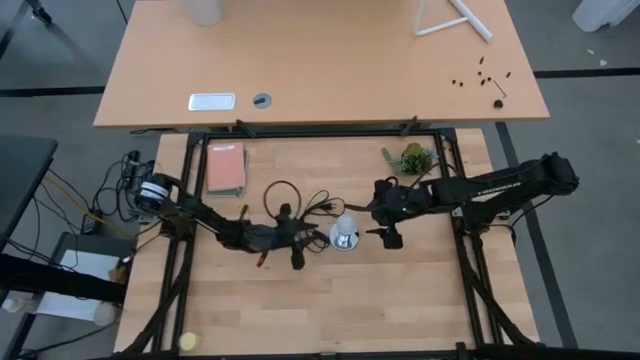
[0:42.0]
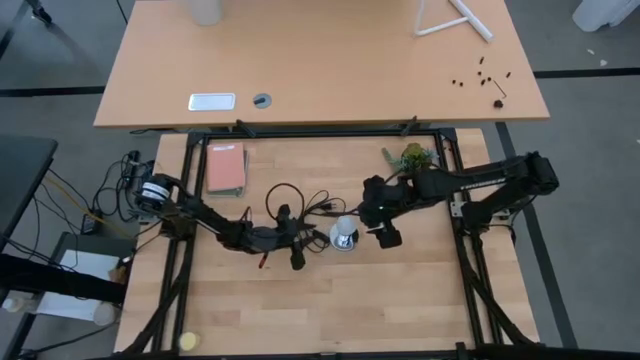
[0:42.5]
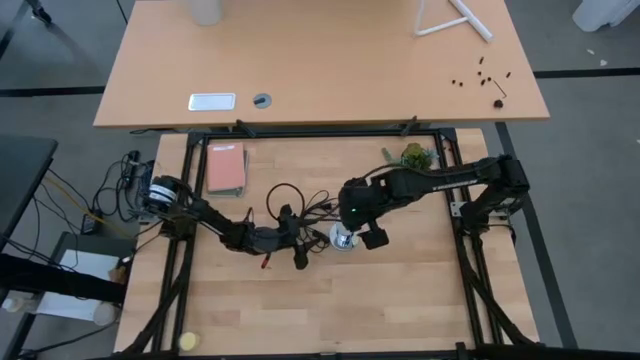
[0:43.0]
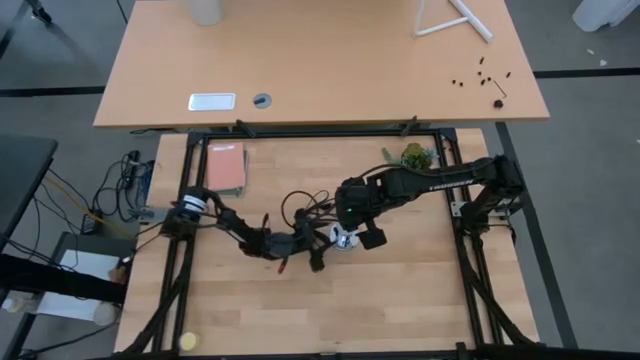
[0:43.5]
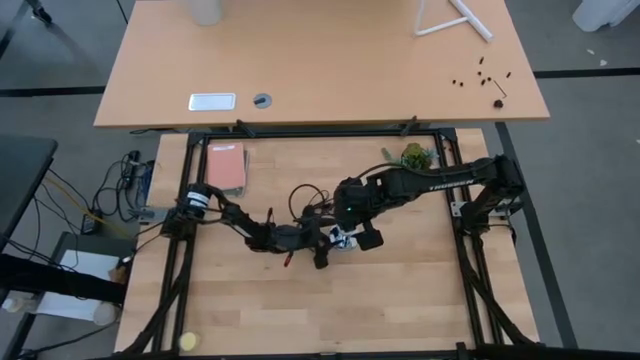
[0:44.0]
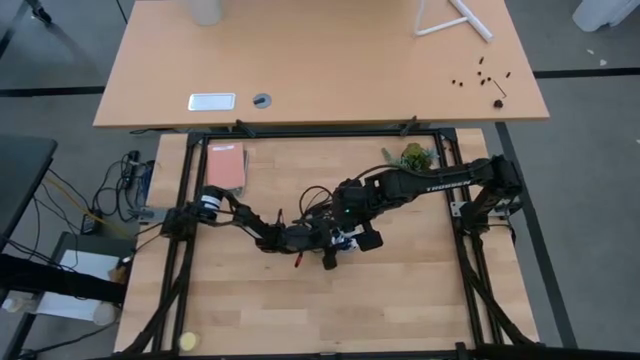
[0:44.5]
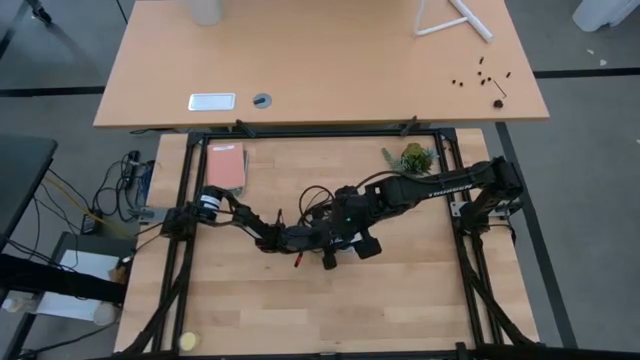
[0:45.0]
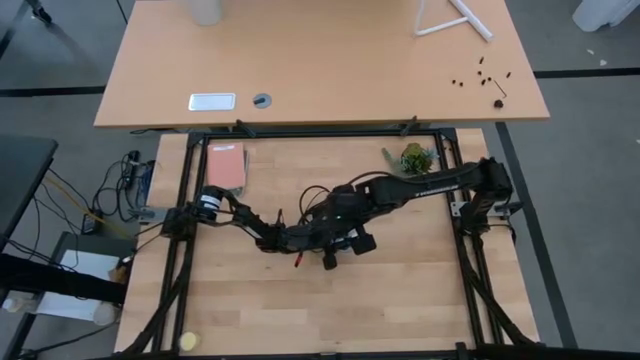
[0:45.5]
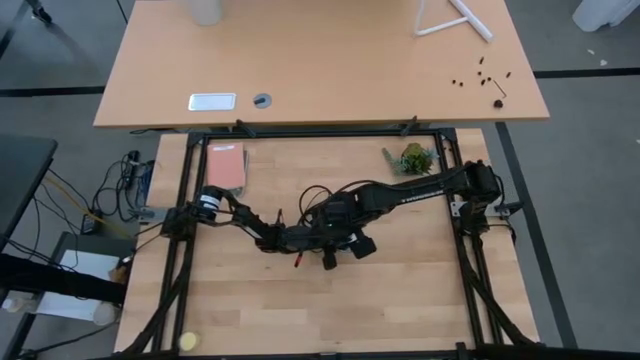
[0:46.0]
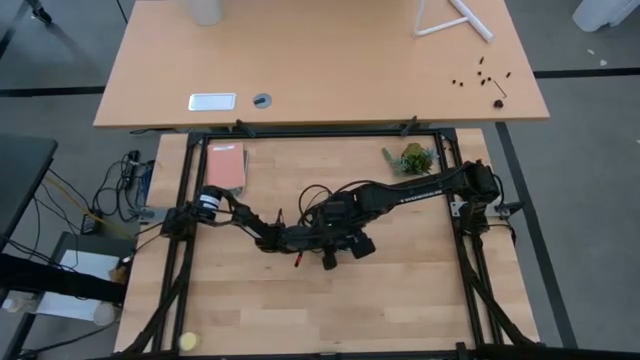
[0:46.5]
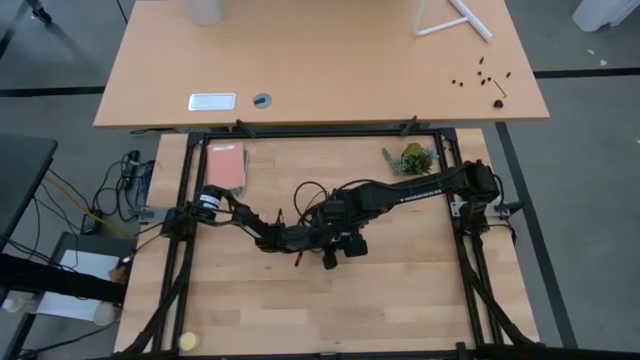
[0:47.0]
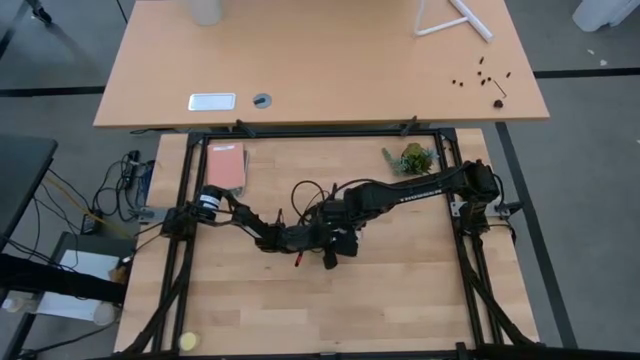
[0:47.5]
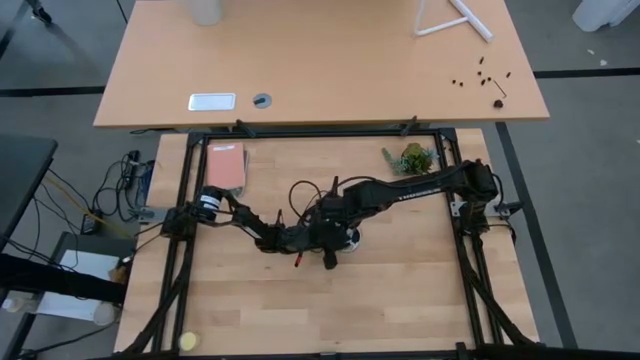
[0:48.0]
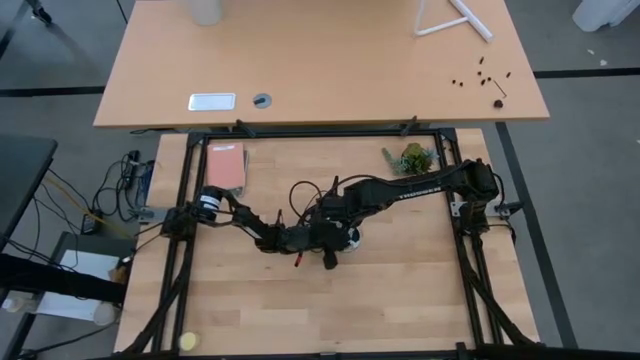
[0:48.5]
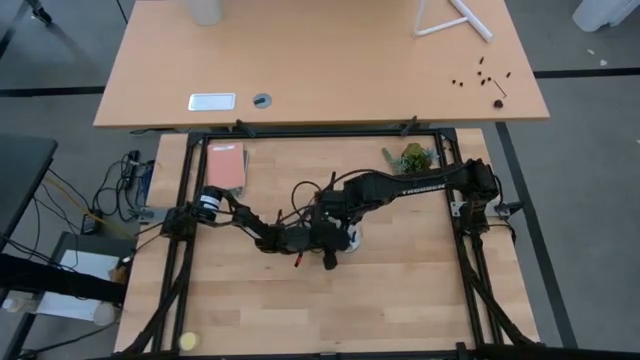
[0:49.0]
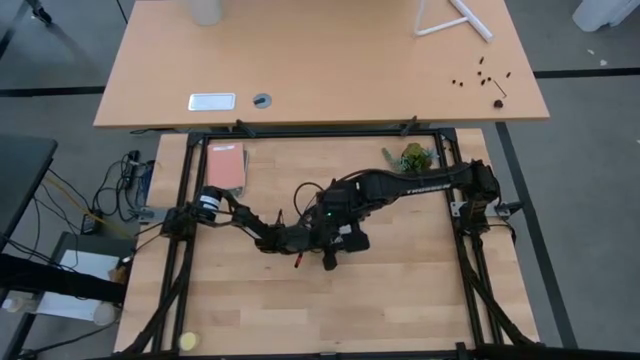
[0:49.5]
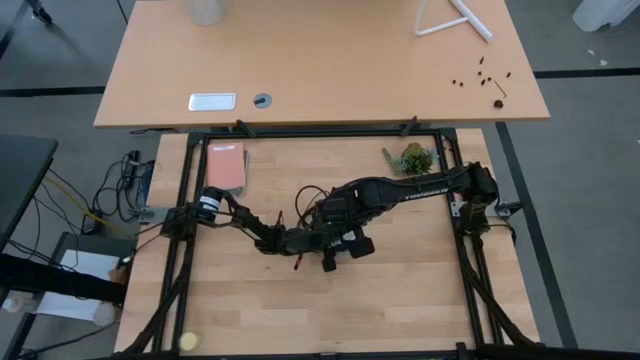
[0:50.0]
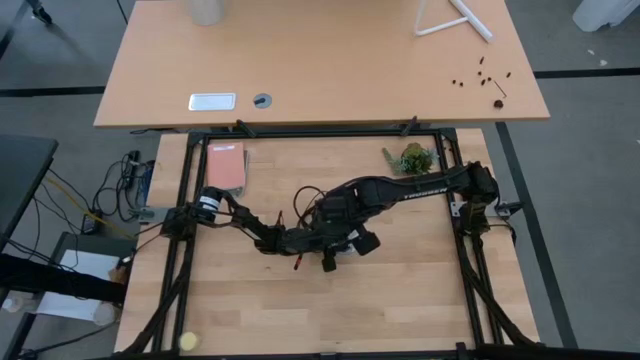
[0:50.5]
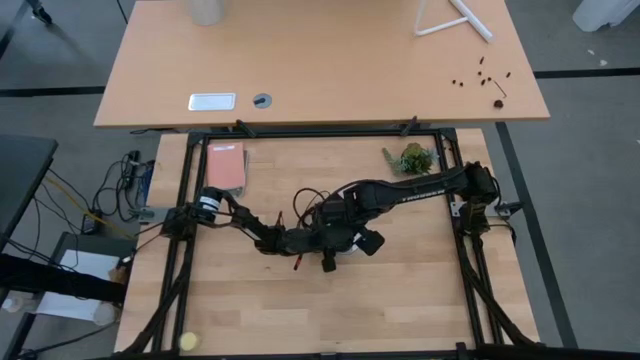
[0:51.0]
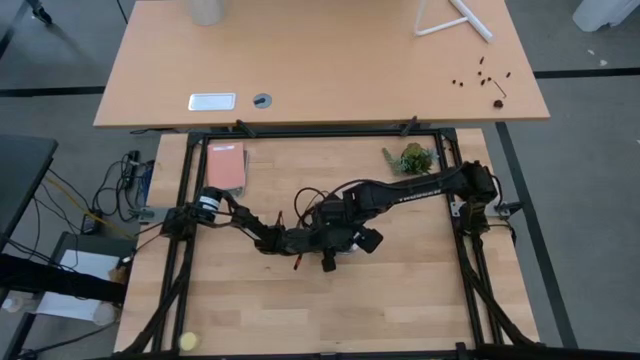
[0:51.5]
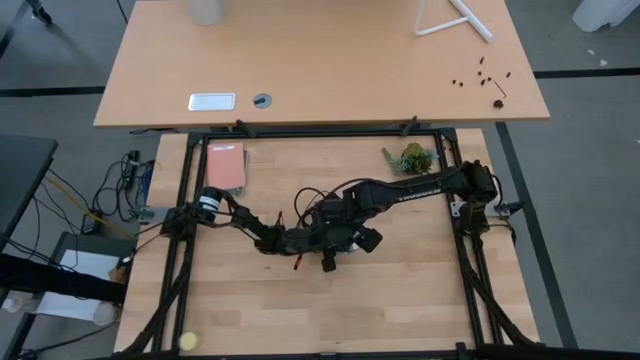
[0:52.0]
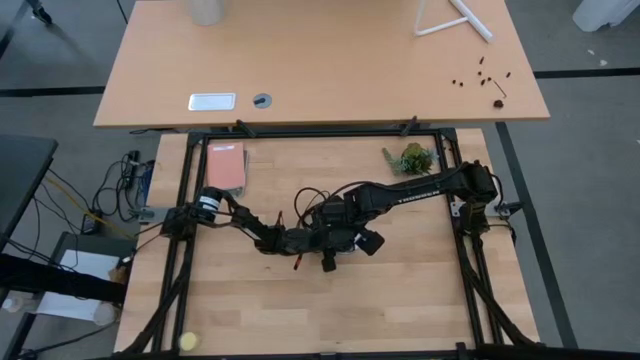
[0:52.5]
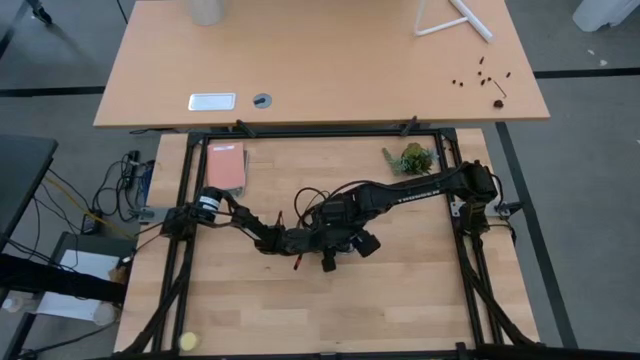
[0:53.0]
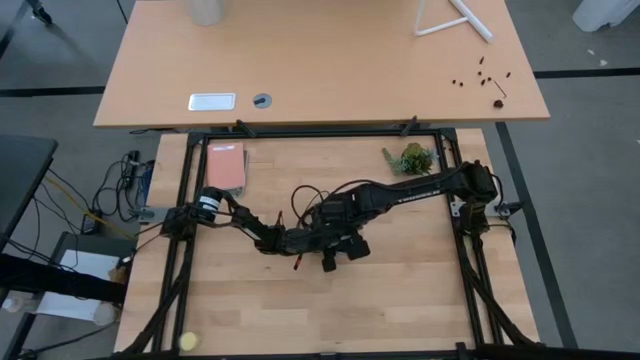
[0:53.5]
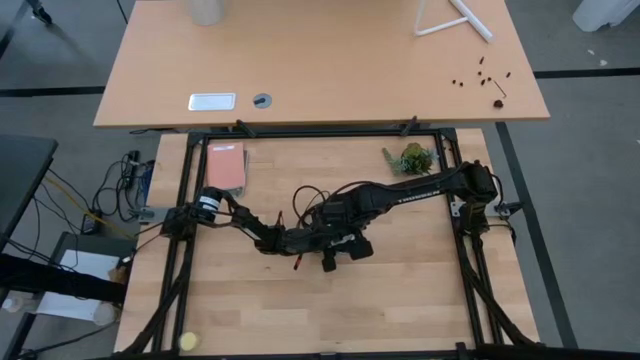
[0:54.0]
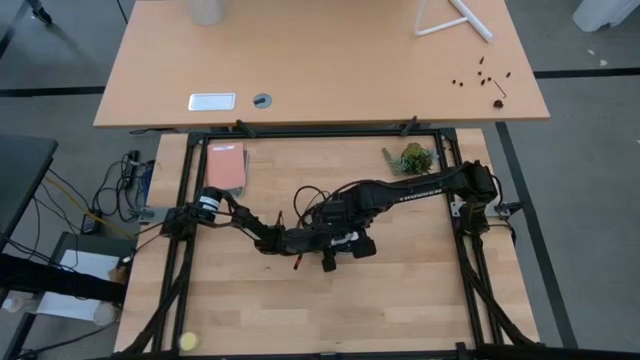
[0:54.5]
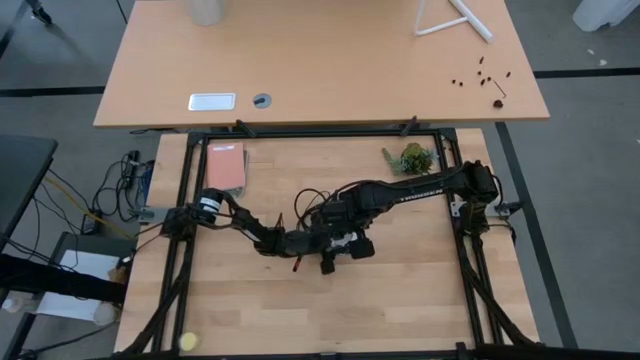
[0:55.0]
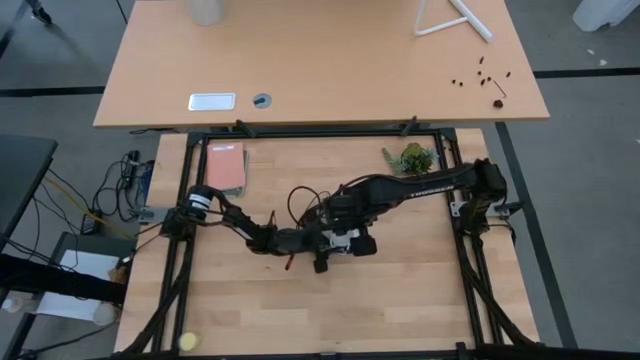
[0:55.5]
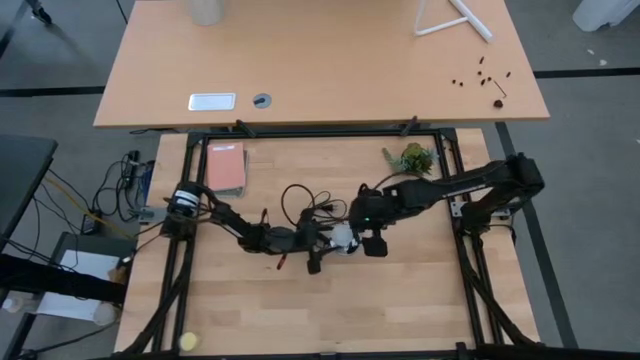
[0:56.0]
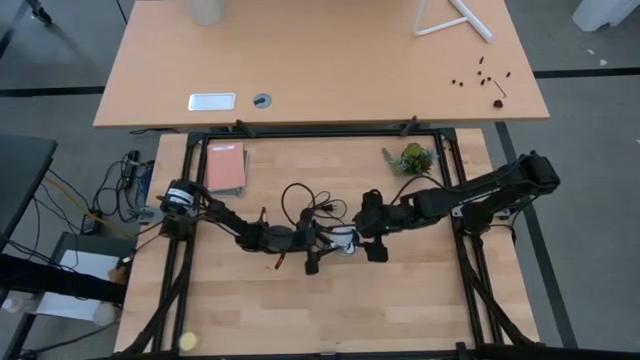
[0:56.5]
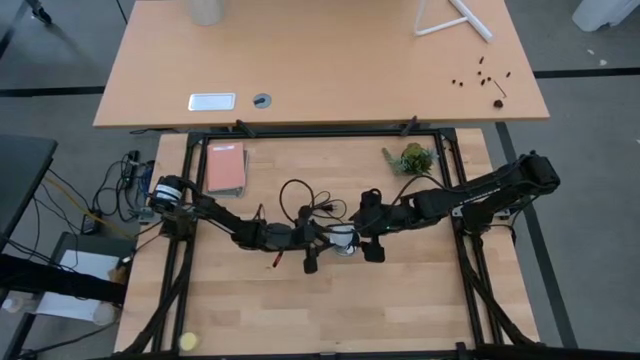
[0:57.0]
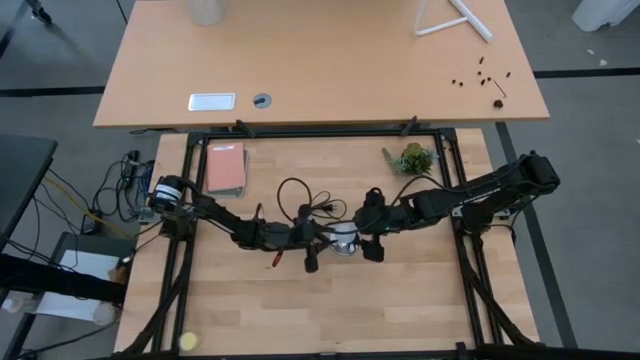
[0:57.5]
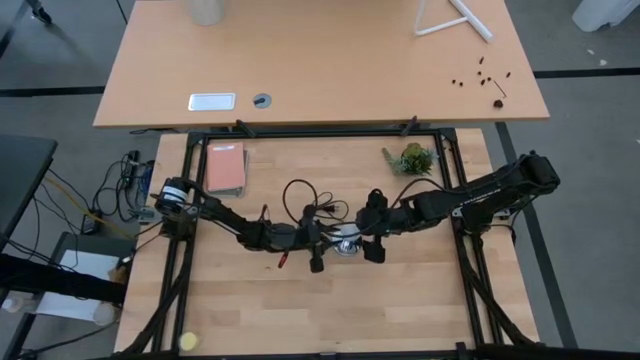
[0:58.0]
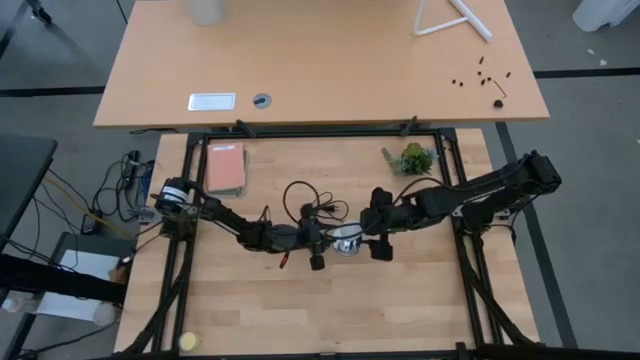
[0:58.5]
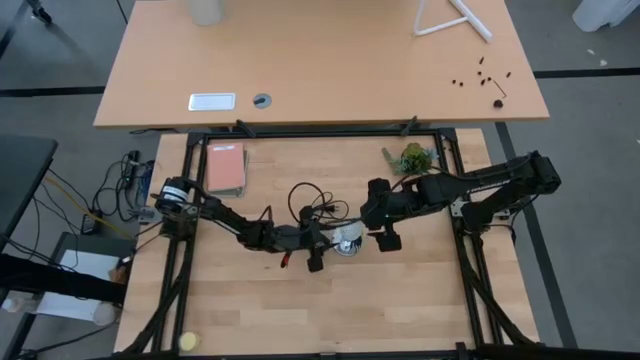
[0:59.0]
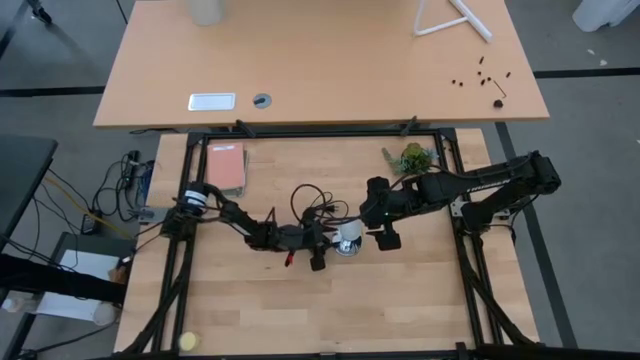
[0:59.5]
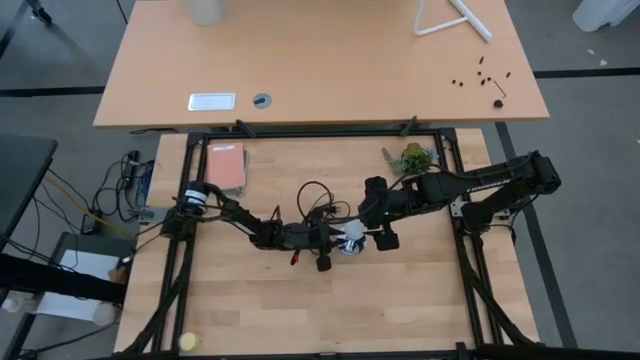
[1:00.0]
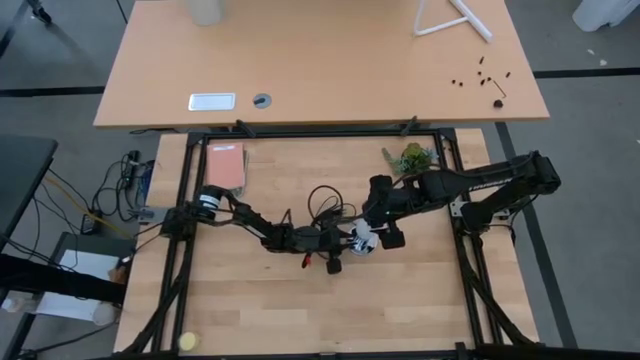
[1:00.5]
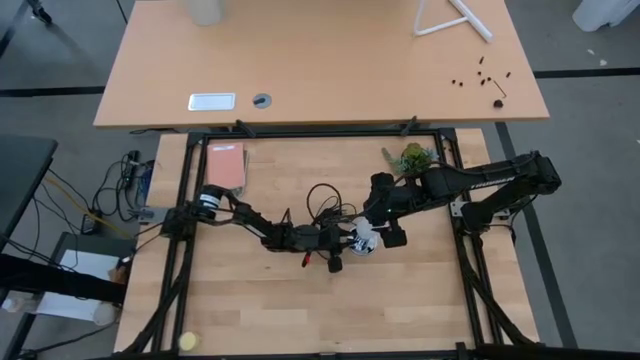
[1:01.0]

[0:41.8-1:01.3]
Task: Screw lightbulb
Insert the lightbulb into the lamp
